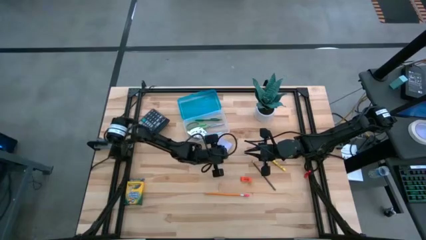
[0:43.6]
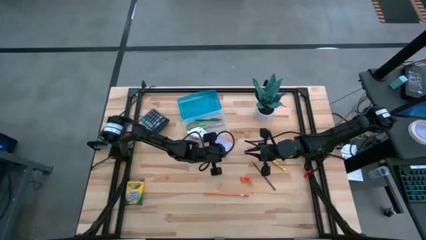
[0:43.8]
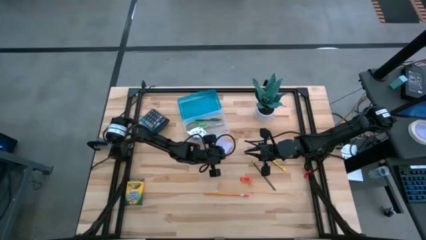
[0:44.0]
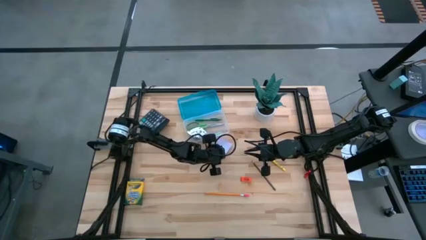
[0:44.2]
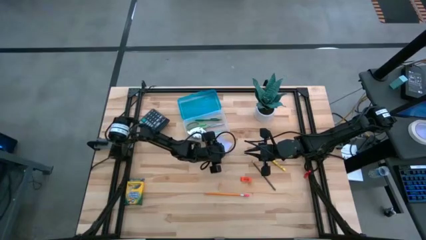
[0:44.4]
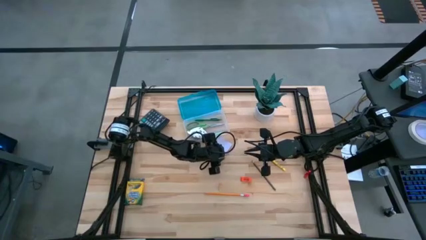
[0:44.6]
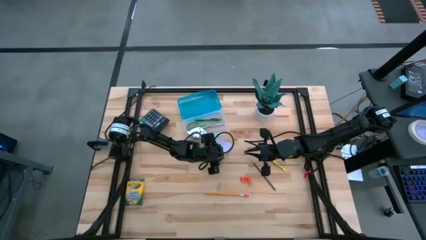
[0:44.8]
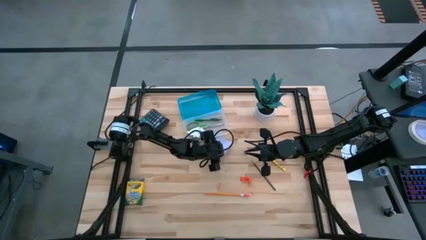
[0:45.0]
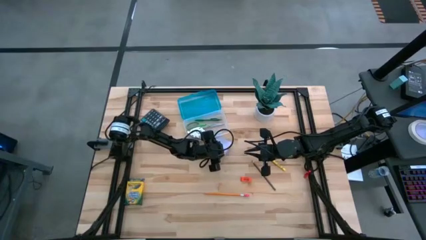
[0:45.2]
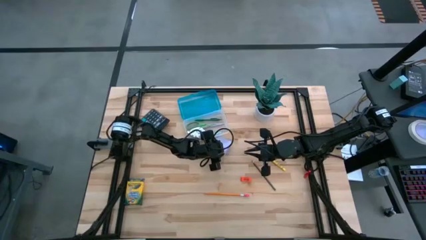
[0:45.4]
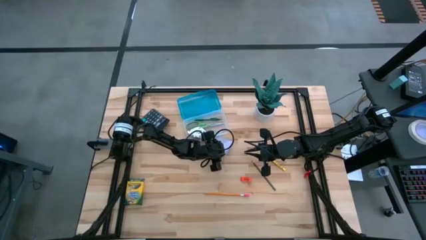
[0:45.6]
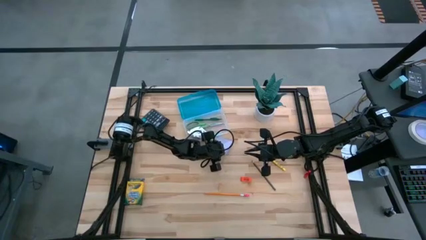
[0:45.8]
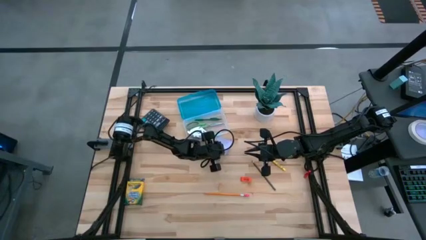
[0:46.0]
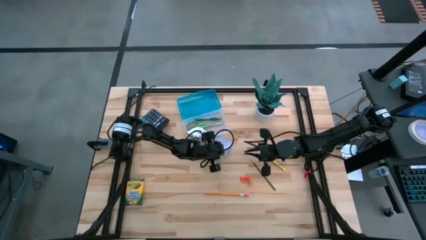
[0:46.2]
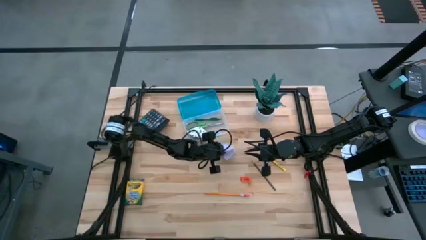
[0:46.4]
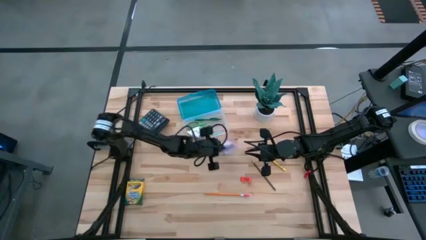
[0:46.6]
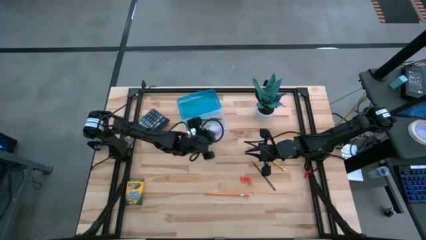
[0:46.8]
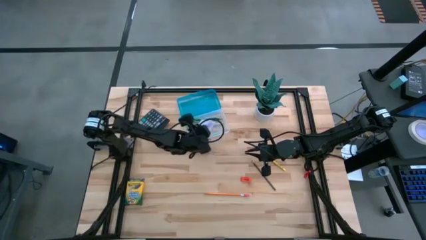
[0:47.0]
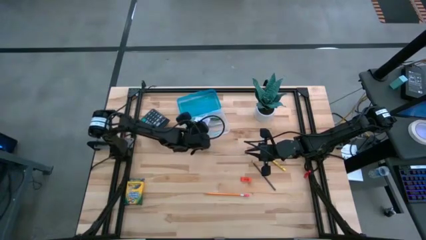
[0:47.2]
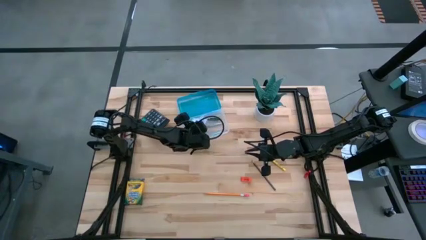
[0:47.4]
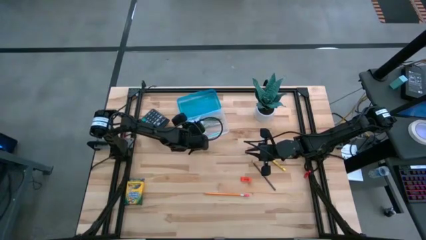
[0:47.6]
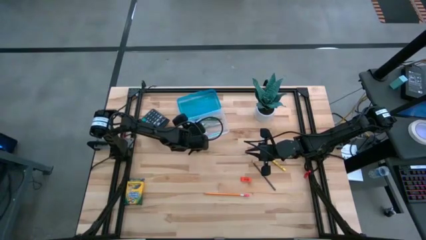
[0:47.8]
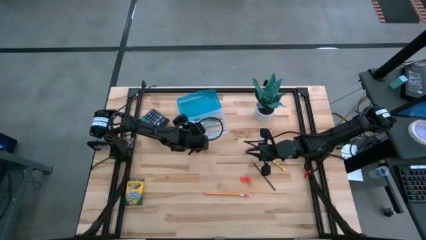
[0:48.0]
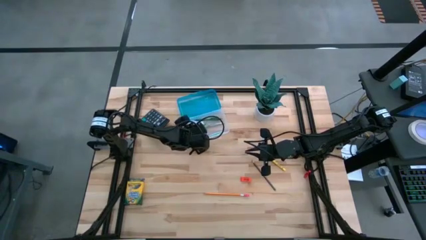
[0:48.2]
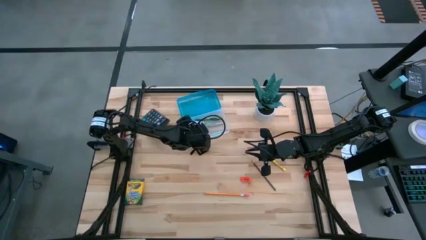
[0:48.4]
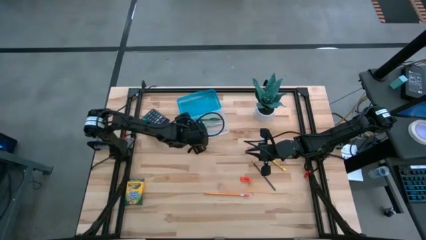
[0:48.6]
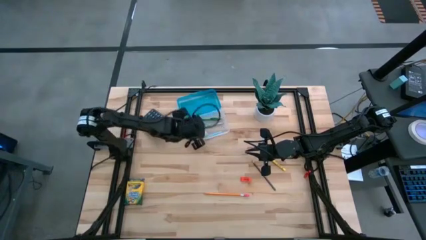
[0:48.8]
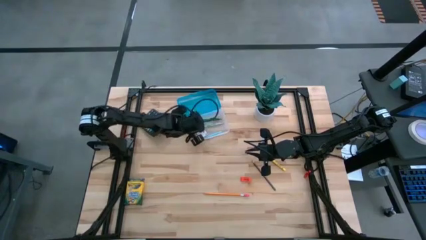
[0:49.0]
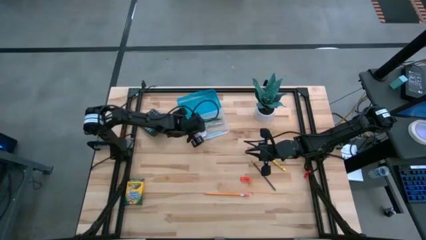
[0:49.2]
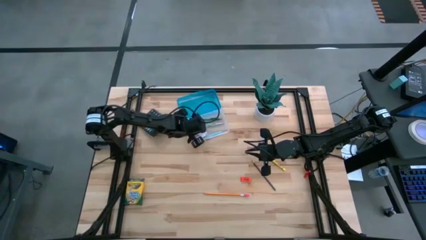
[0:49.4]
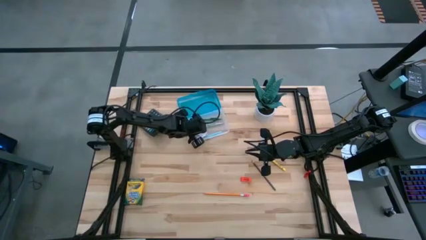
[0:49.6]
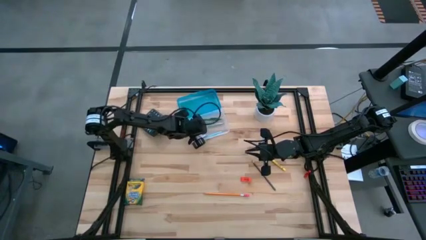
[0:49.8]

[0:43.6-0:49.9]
Task: Pack school essentials
Put the purple sticky notes into the blue supply box

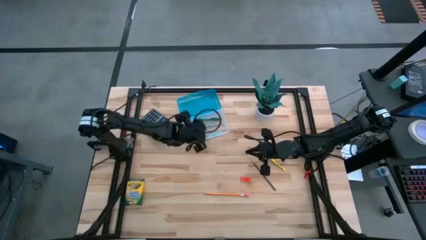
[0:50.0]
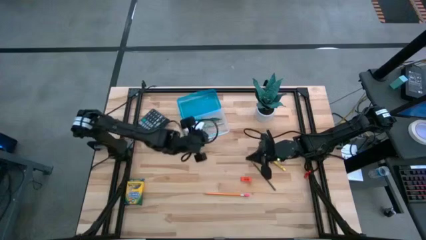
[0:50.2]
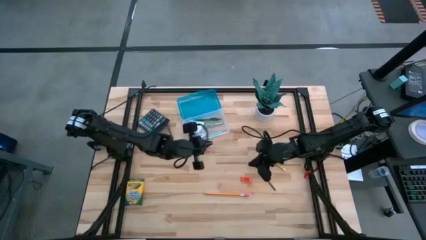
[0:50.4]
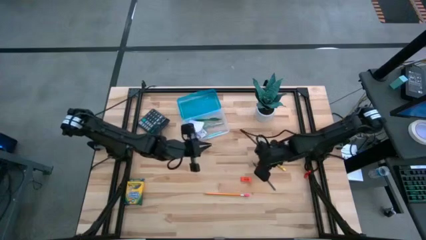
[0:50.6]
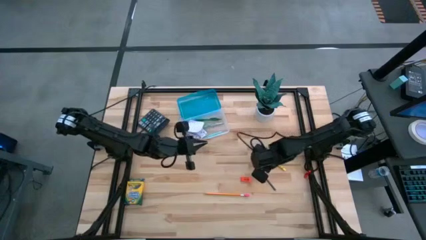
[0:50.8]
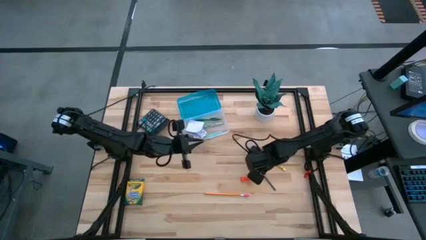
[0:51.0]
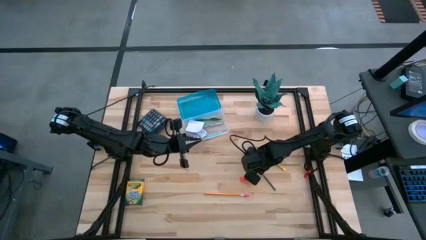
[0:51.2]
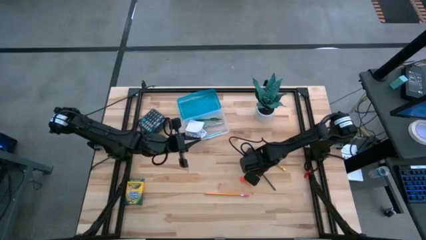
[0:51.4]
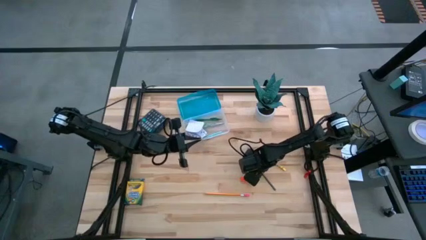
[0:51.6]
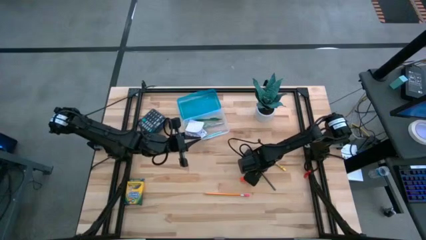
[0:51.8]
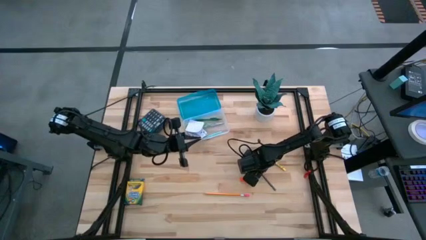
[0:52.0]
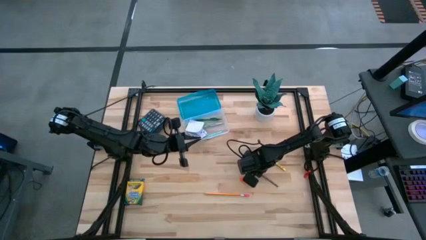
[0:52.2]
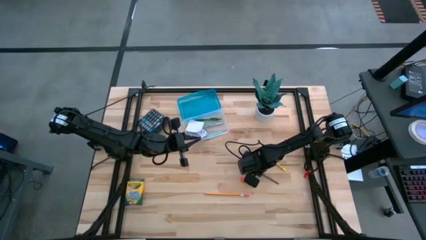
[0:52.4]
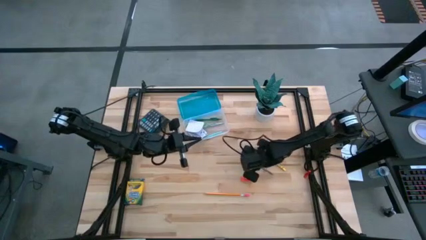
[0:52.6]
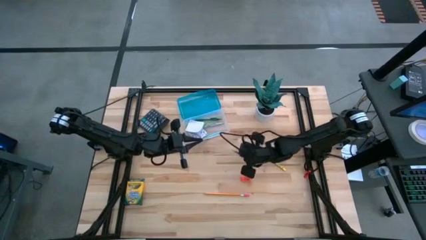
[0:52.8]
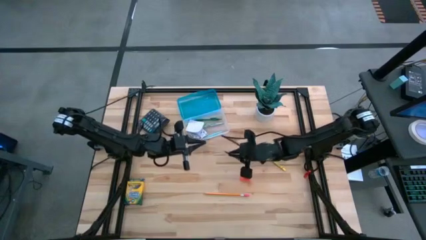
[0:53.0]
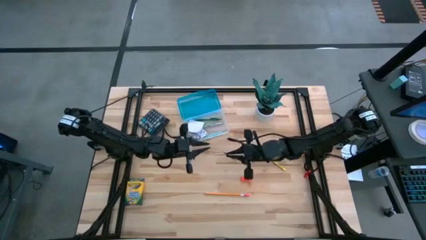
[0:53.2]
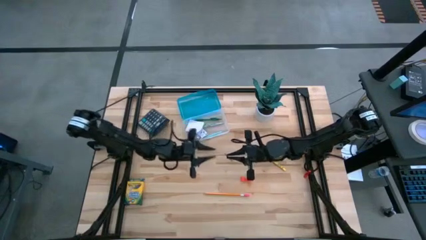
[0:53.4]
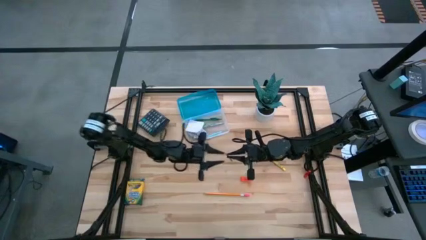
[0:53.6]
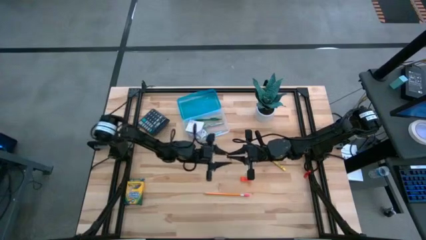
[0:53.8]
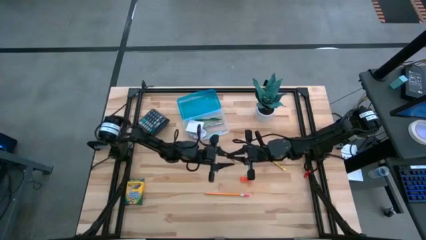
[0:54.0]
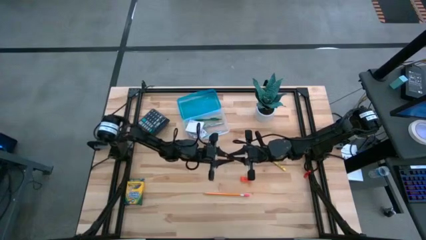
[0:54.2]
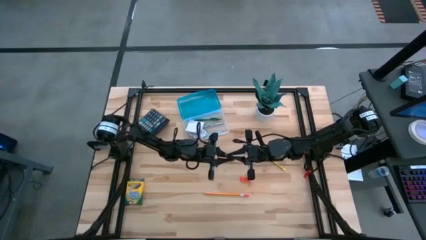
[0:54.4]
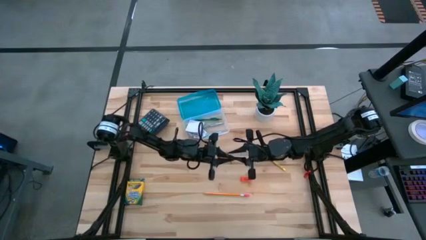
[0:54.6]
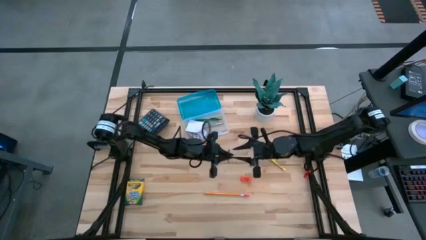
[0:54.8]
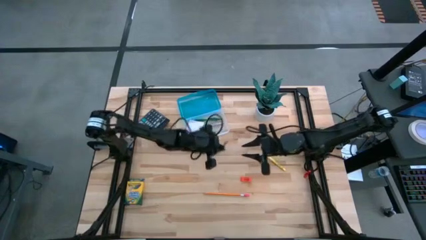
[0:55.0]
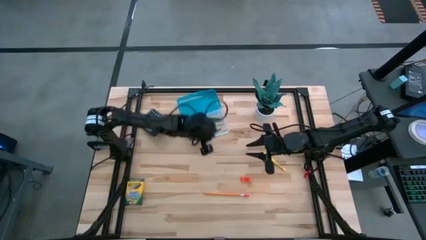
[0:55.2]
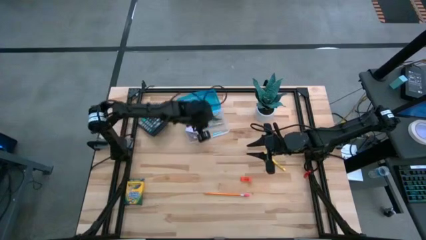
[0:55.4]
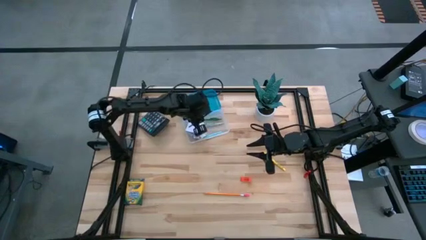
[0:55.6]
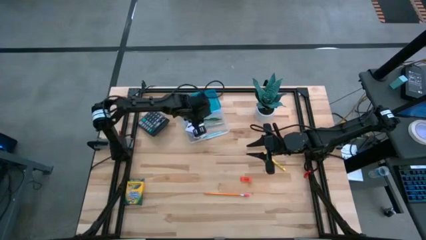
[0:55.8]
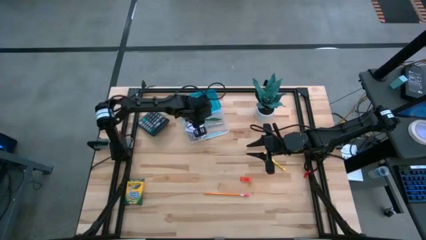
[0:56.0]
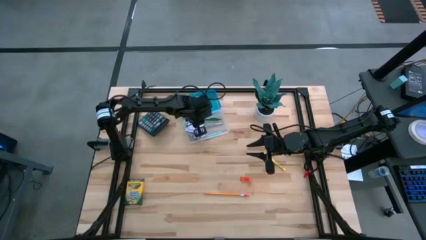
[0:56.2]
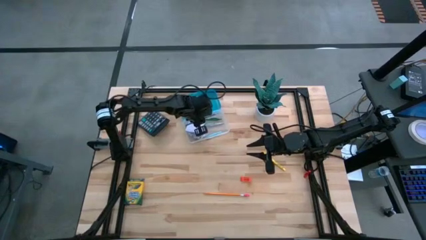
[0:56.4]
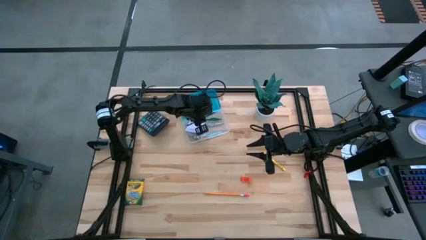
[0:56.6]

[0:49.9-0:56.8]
Put the black pencil into the blue supply box

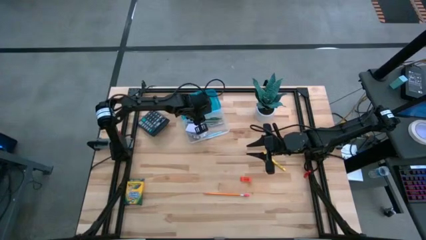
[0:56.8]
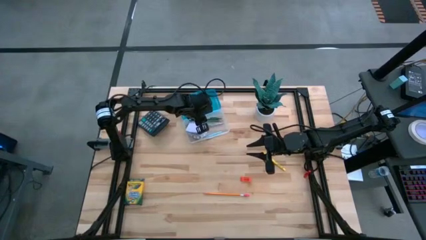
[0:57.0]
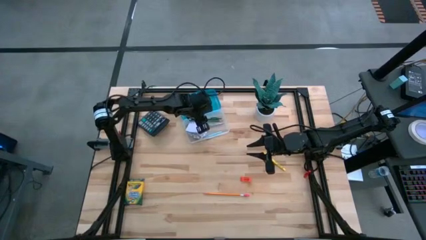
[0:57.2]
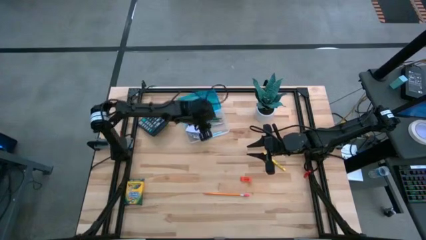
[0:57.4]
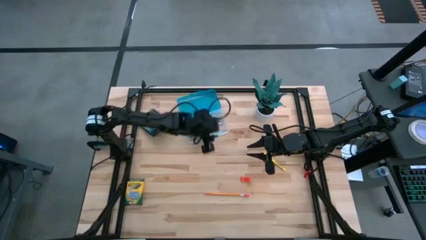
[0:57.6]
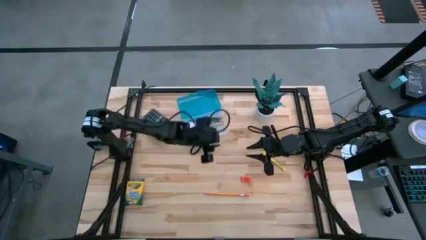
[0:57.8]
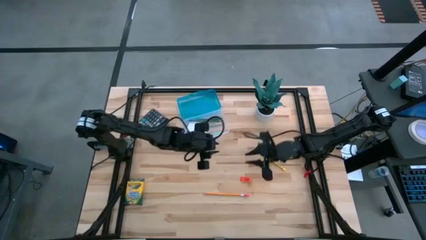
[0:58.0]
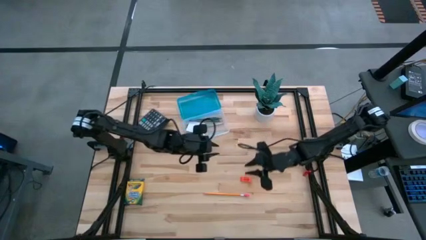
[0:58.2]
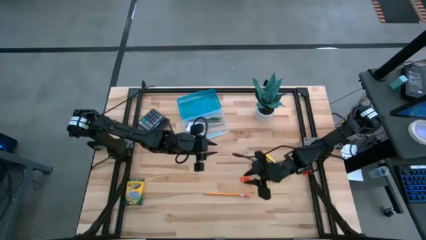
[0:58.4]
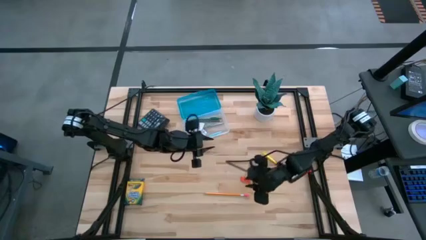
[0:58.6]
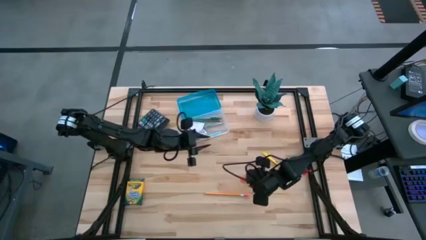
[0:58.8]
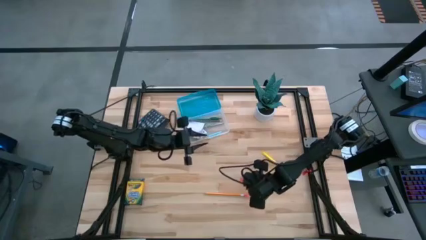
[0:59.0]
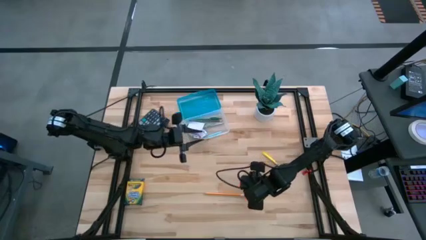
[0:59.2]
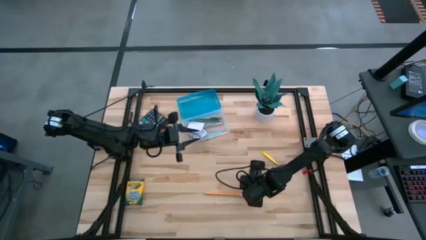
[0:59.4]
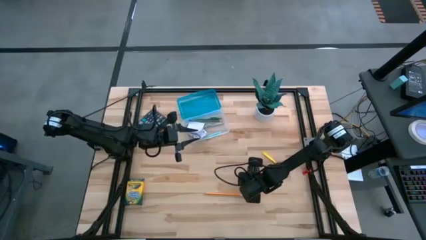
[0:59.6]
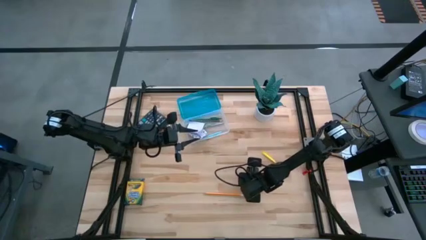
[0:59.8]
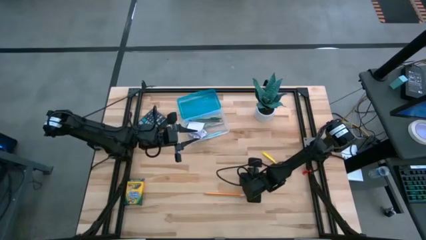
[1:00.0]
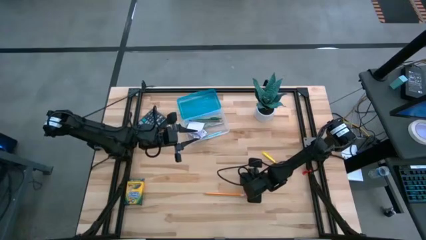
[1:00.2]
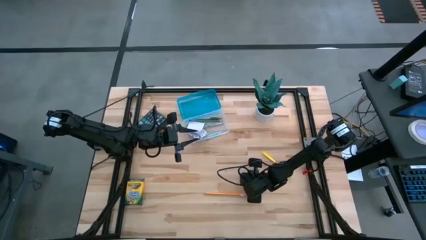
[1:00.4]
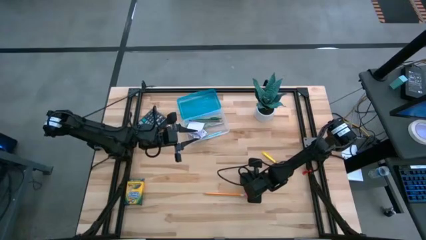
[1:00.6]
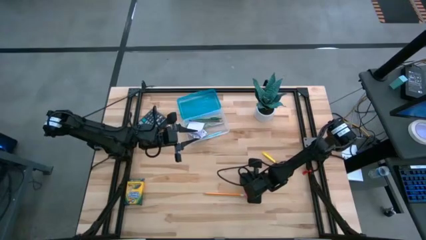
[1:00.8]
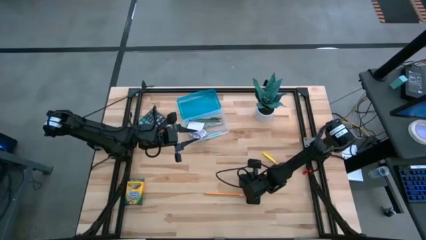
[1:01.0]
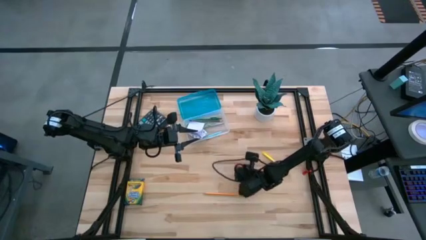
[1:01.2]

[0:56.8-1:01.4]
Put the orange eraser into the blue supply box
